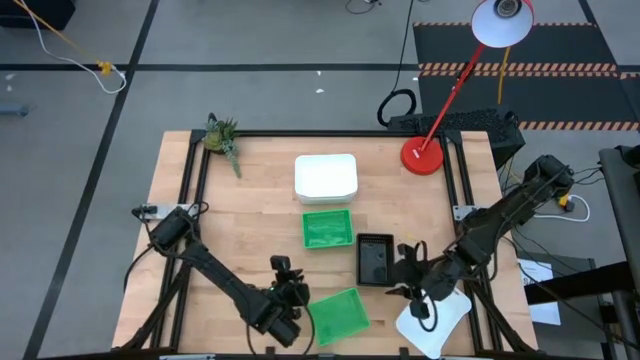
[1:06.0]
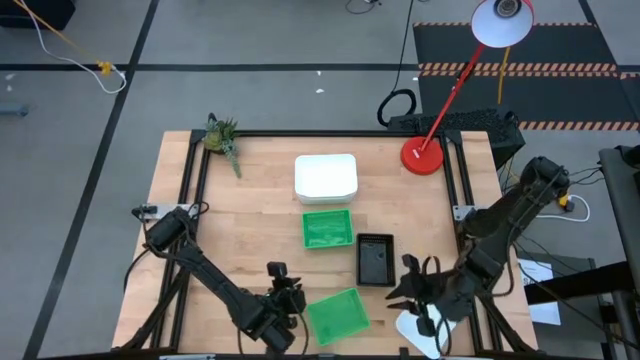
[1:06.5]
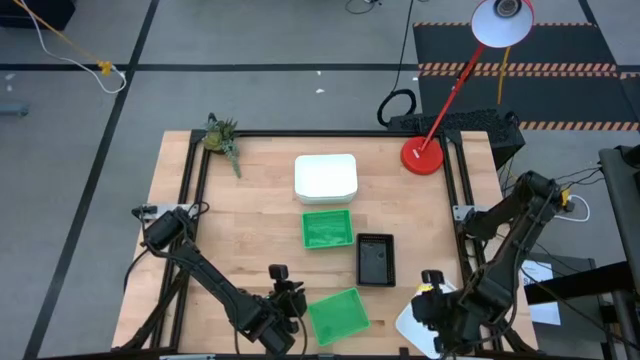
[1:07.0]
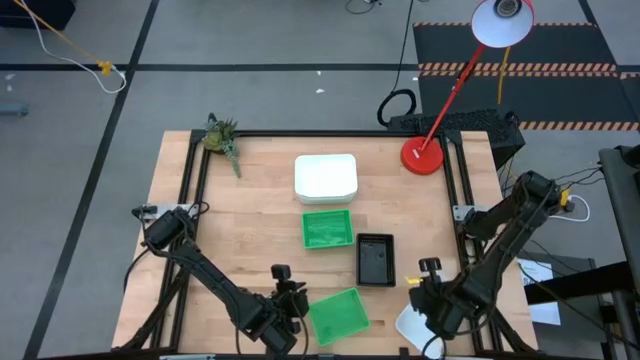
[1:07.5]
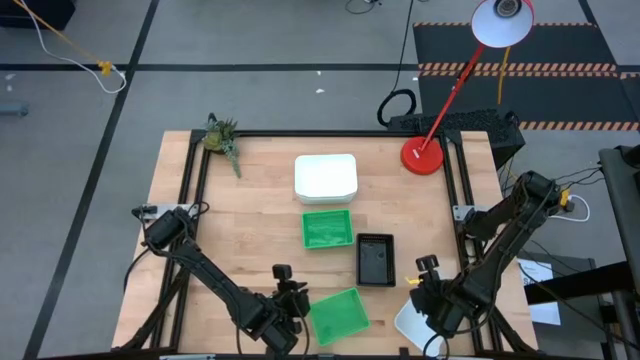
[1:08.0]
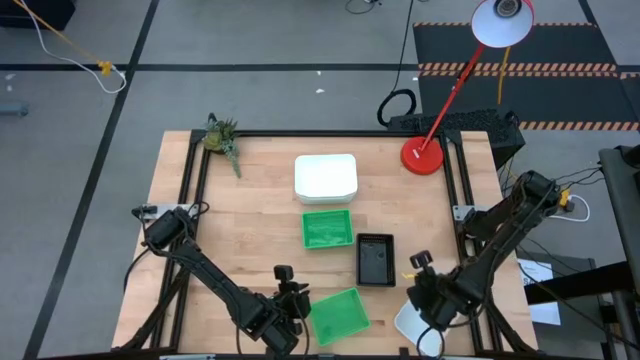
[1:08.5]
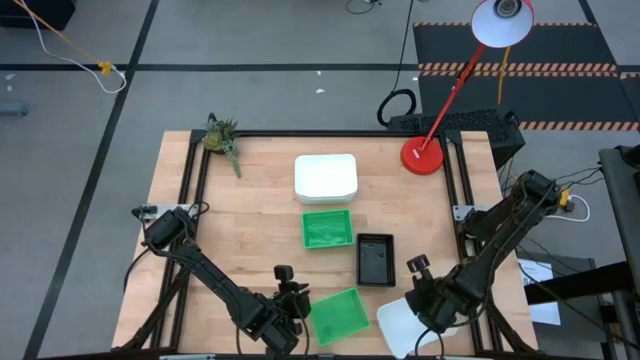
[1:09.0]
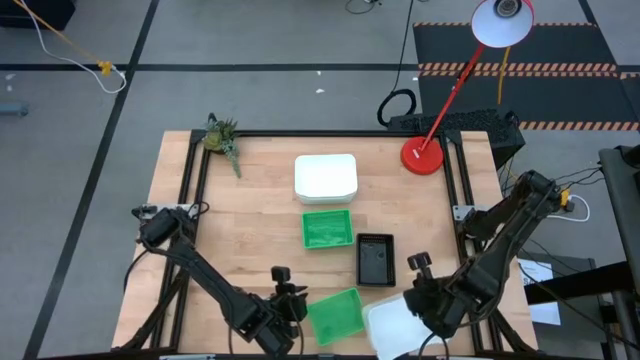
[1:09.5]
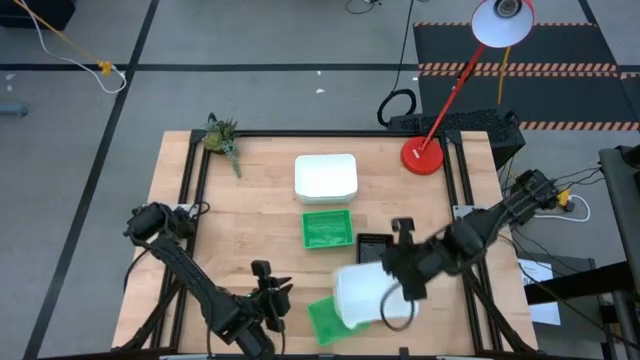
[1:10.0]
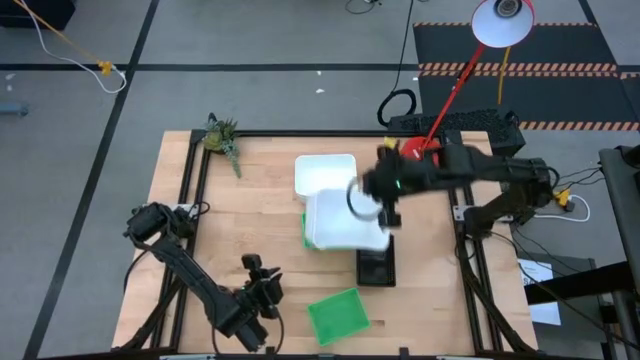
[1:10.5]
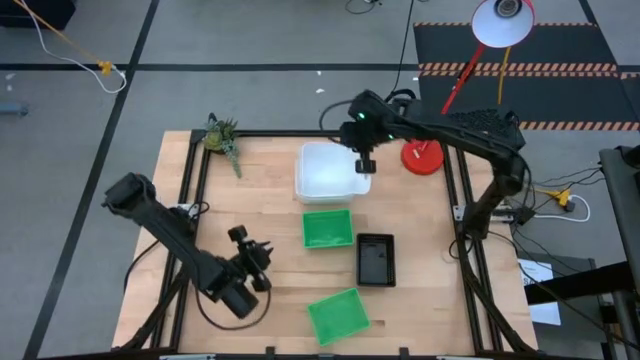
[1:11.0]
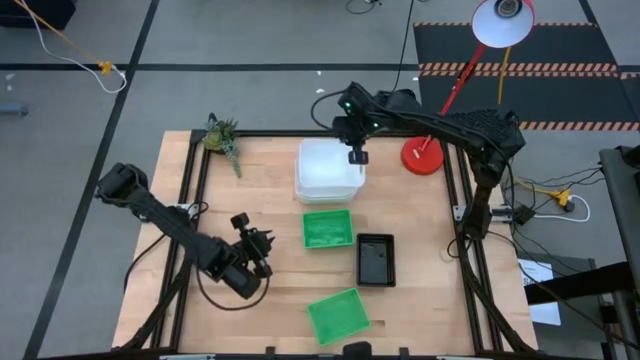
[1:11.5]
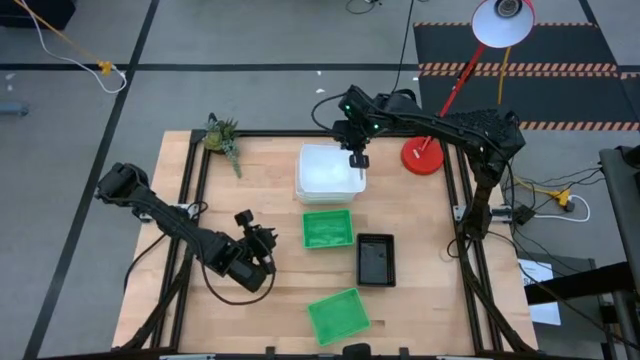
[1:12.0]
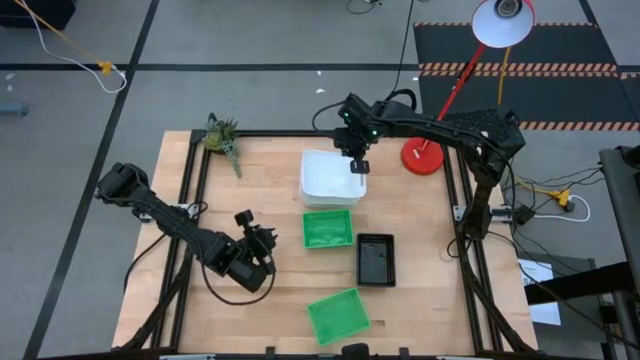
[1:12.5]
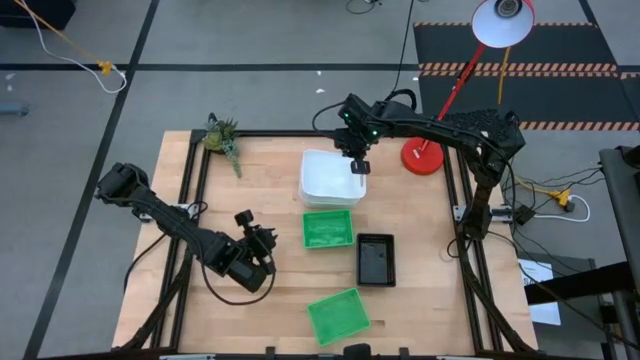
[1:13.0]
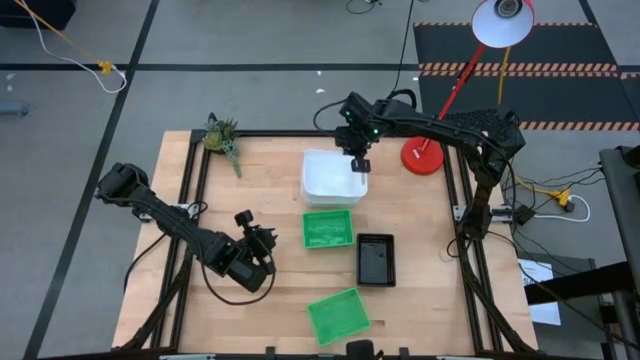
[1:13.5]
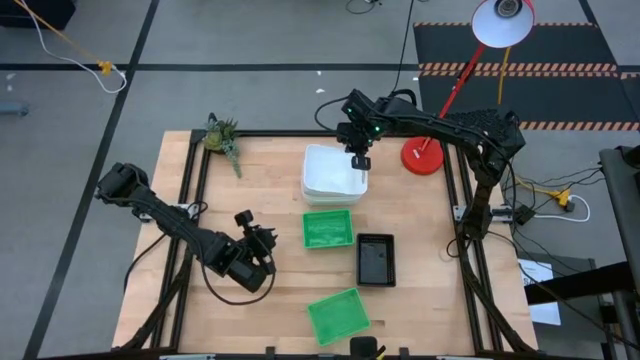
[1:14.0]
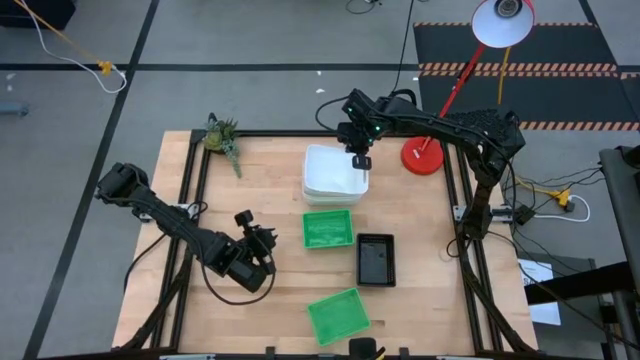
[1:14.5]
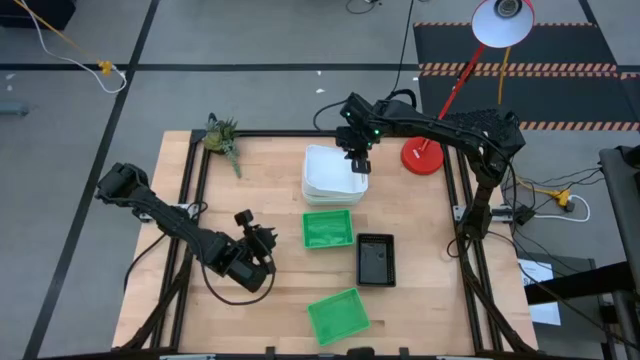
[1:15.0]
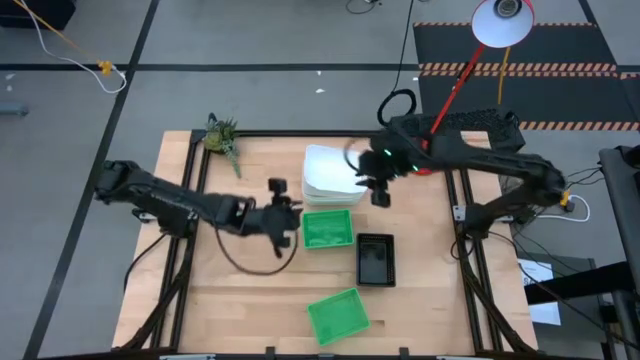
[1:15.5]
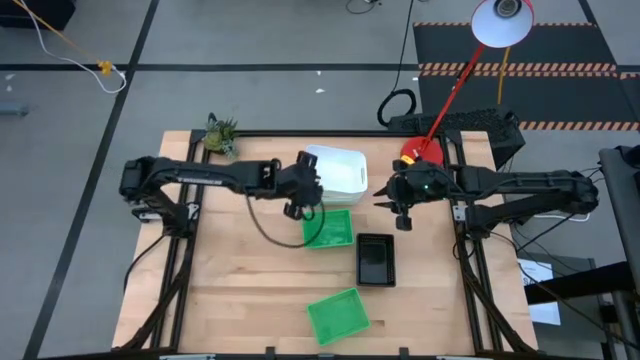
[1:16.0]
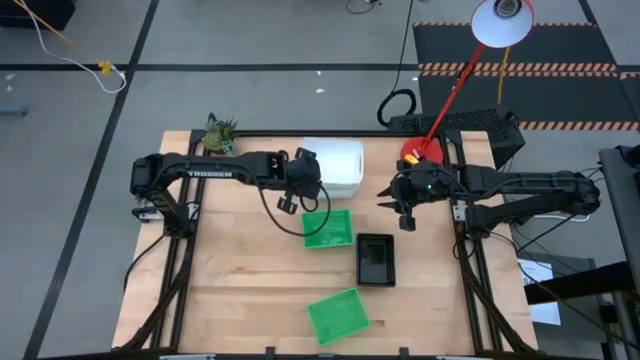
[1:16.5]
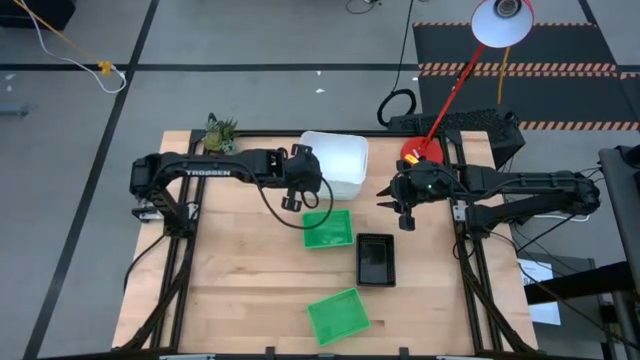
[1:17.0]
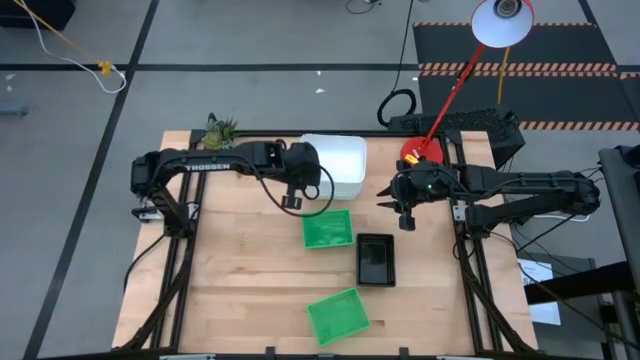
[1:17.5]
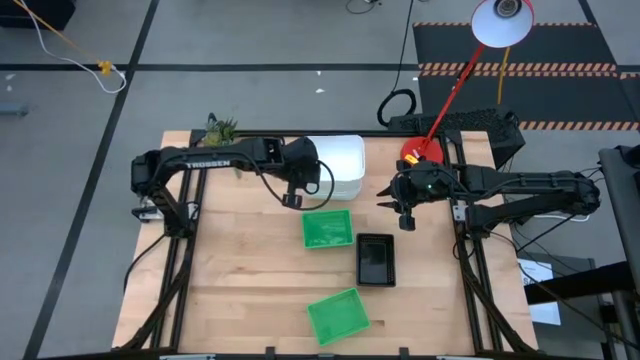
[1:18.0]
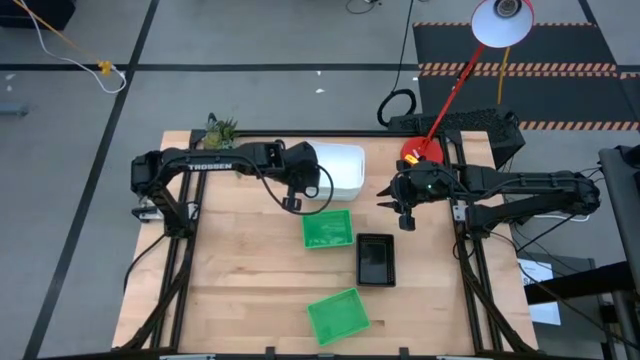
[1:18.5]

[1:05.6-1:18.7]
Stack the bottom white bin on the top stacked white bins

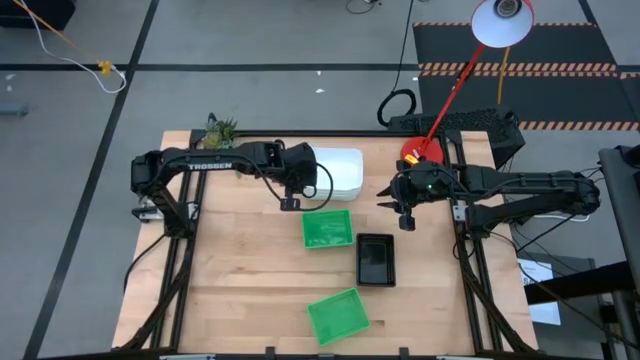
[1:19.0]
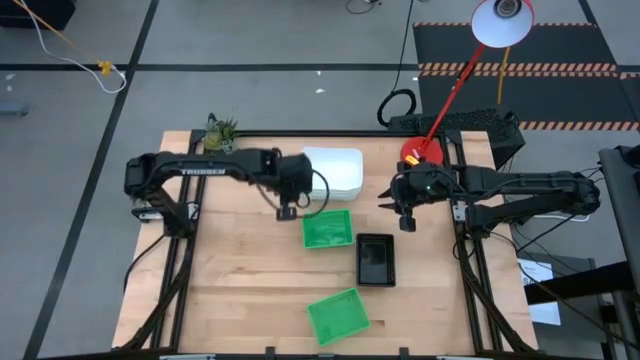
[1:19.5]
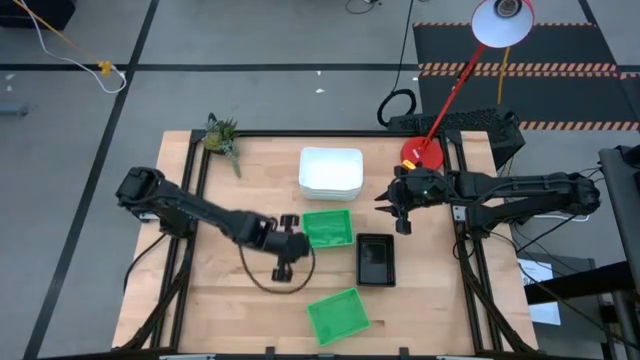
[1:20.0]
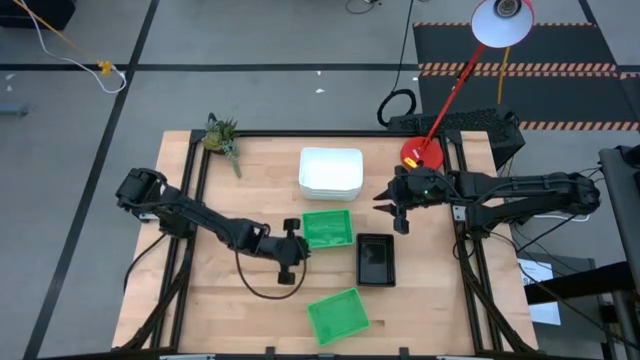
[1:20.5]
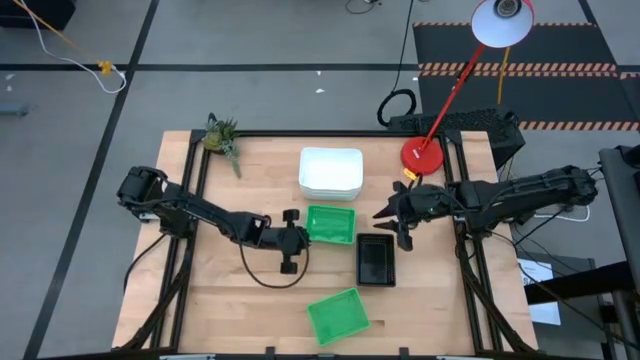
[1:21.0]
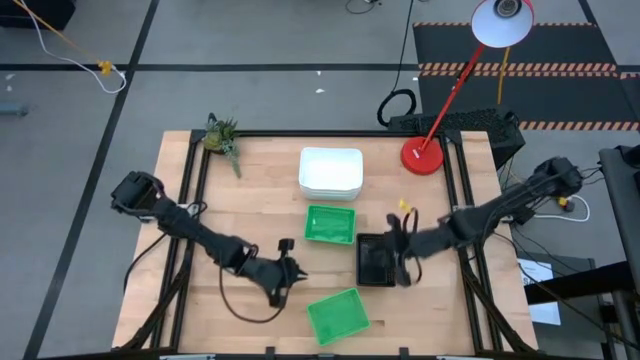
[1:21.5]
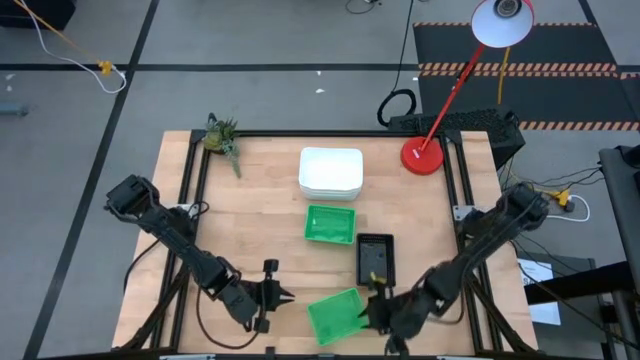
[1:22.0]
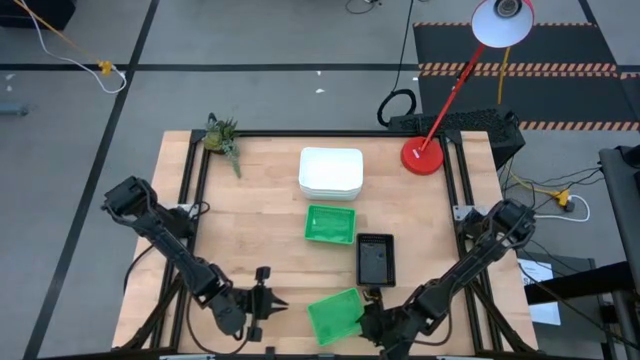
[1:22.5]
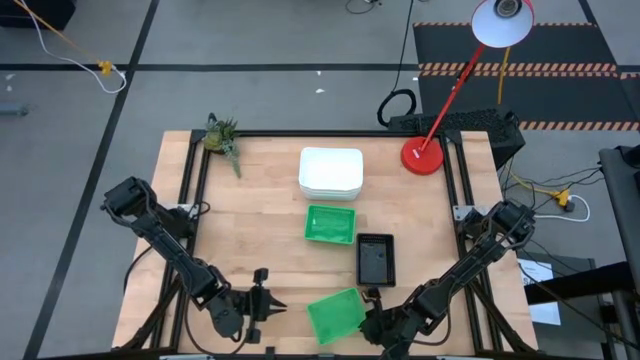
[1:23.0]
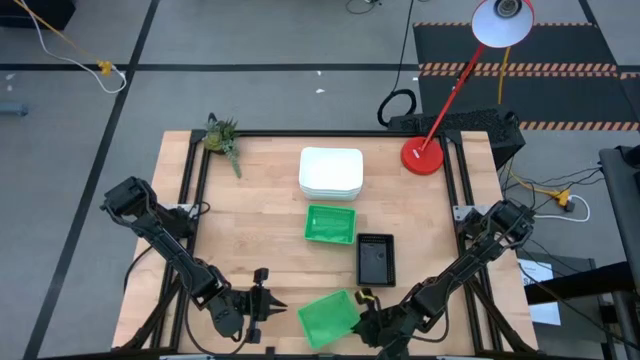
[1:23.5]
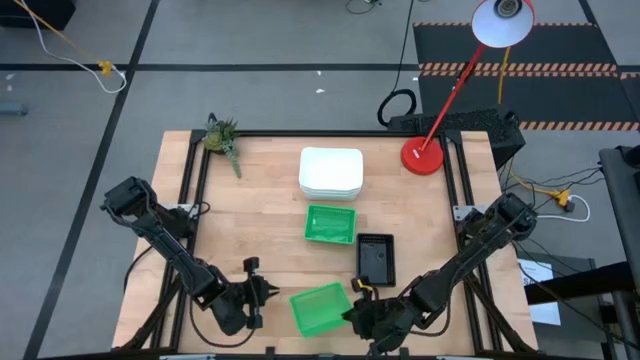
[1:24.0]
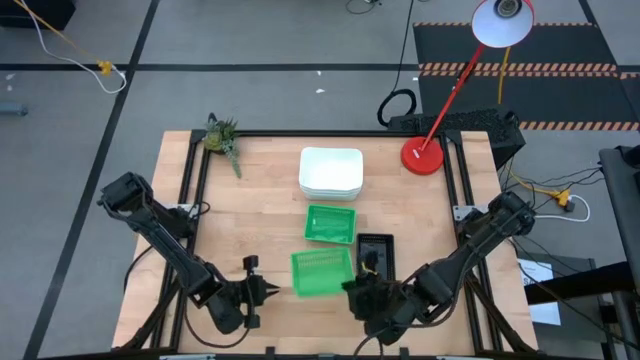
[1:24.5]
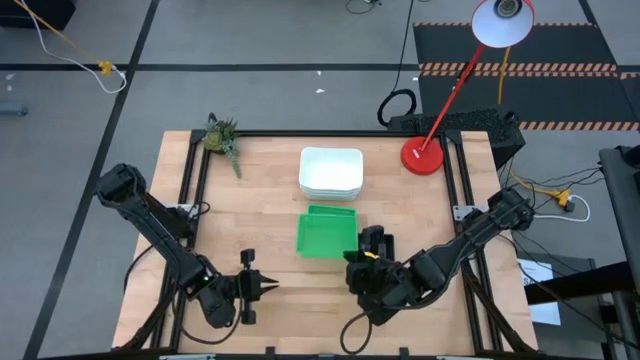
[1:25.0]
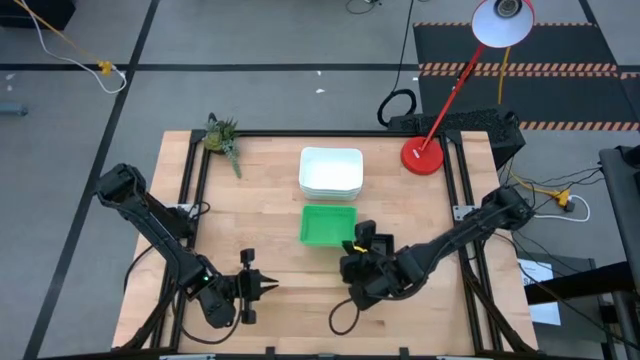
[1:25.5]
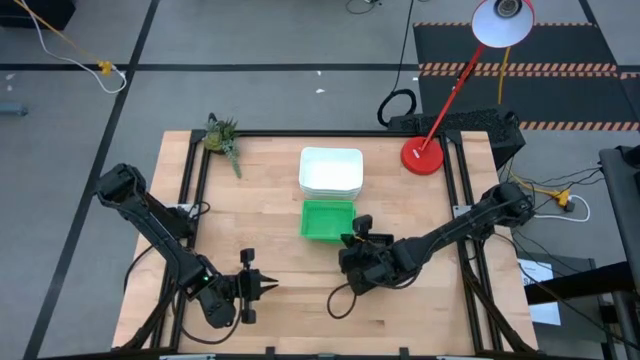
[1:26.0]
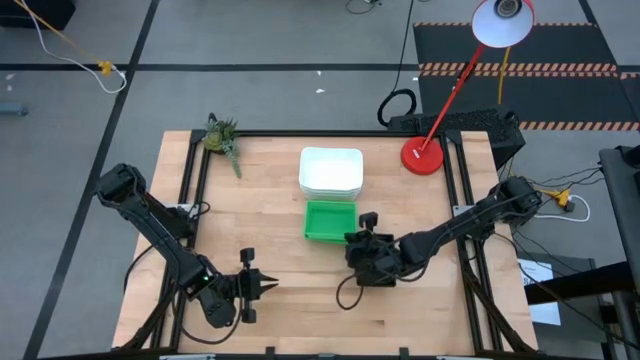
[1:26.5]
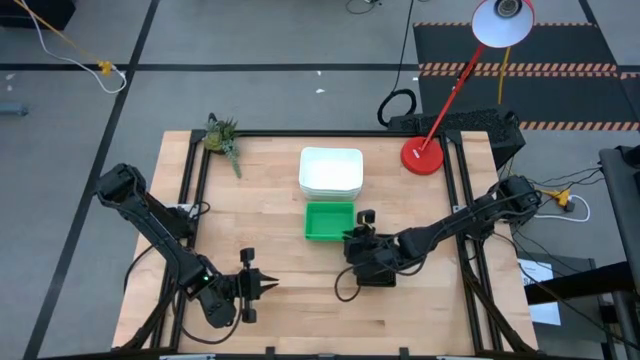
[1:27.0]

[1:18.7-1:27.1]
Stack the bottom green bin on the top stacked green bins
